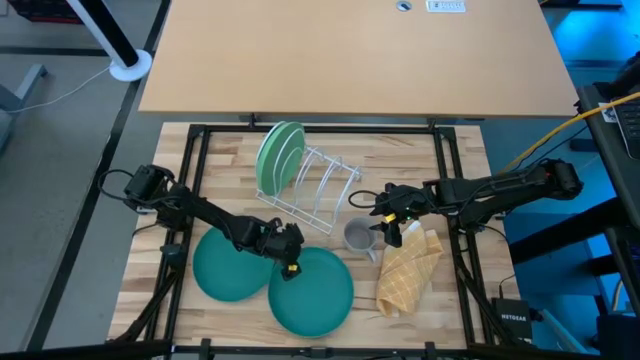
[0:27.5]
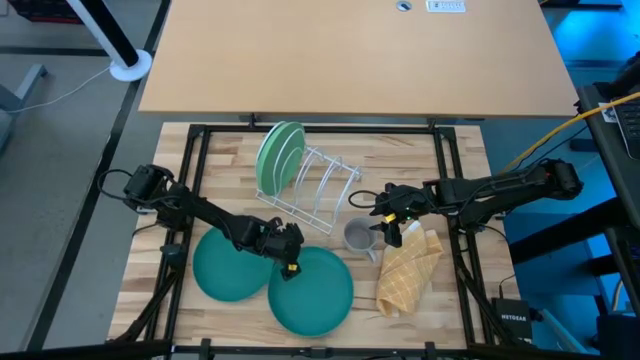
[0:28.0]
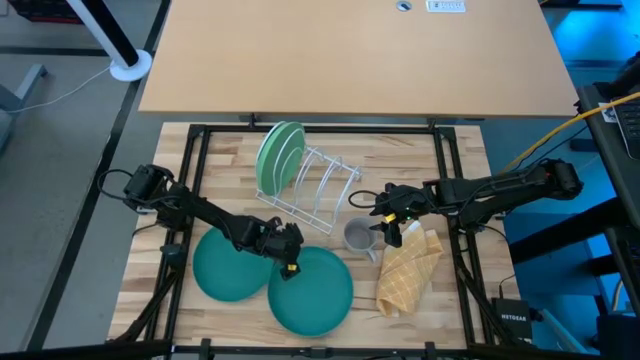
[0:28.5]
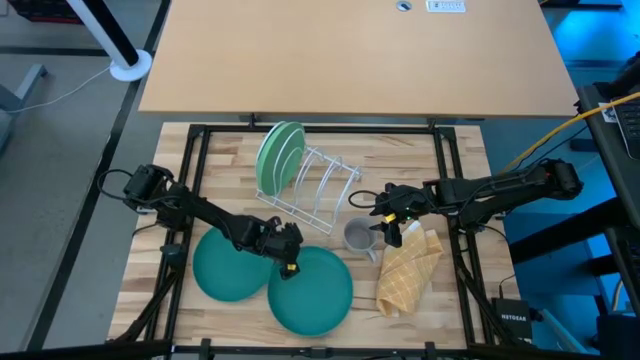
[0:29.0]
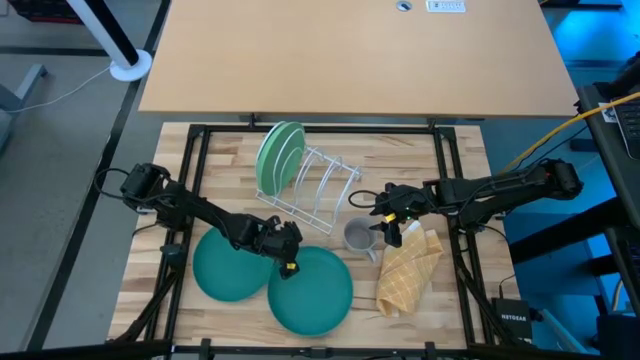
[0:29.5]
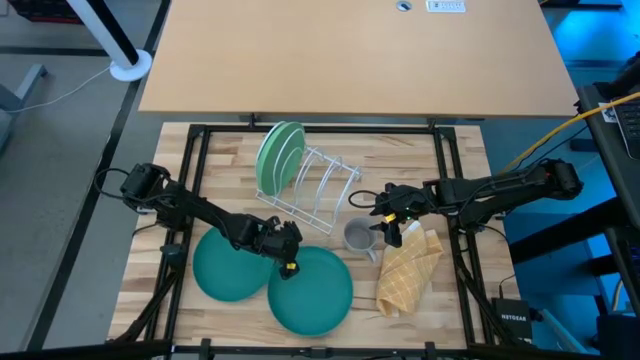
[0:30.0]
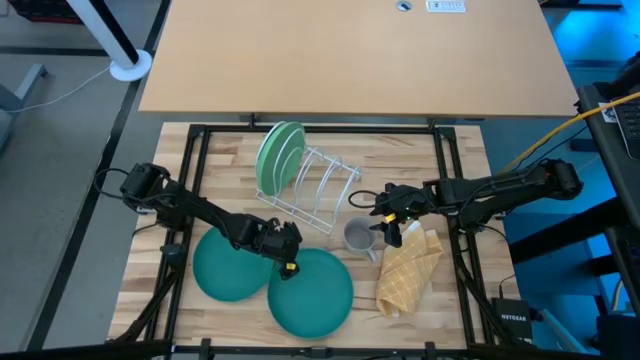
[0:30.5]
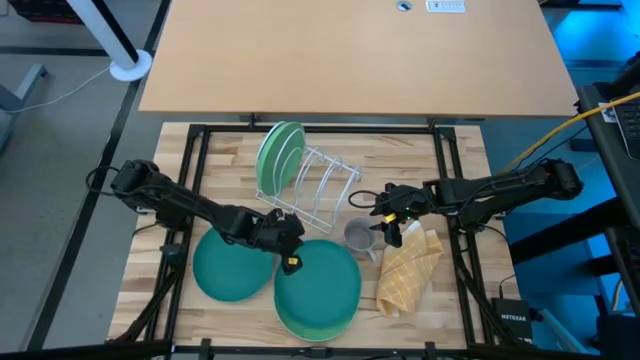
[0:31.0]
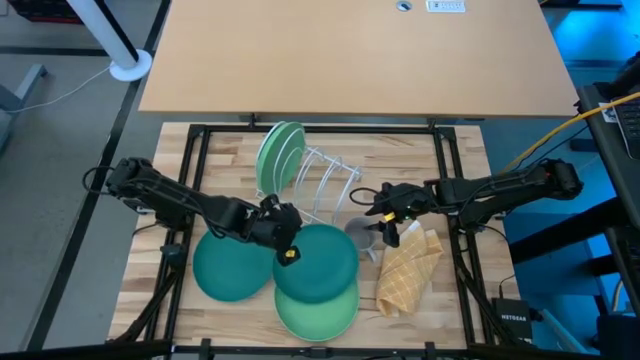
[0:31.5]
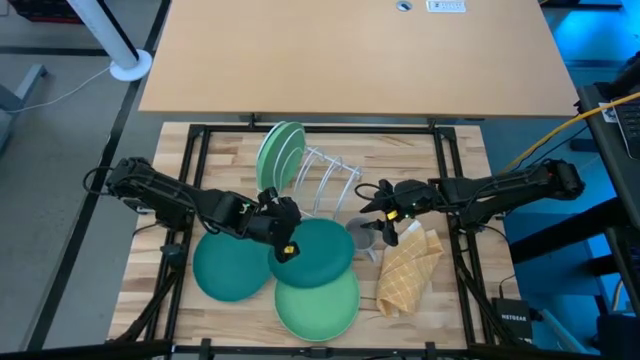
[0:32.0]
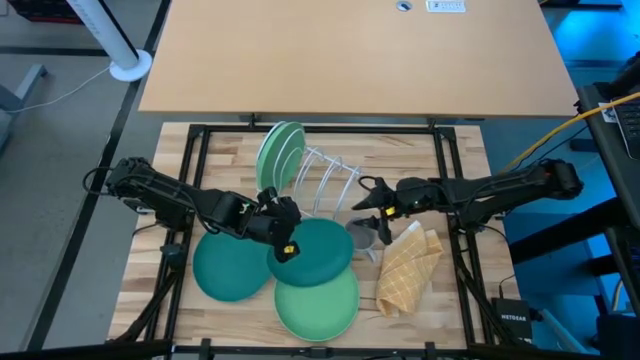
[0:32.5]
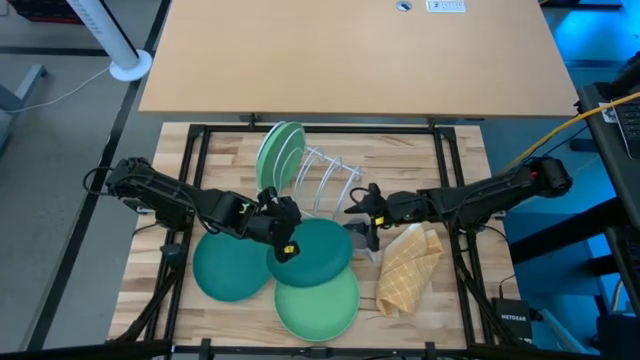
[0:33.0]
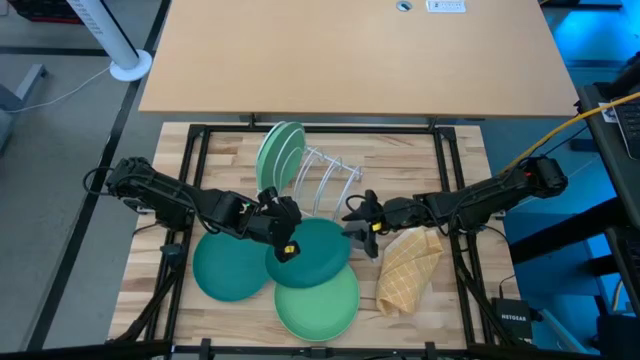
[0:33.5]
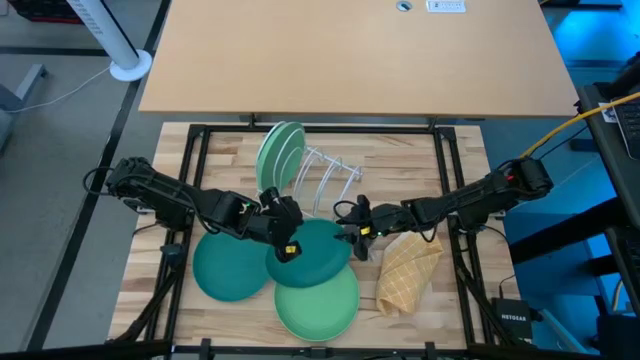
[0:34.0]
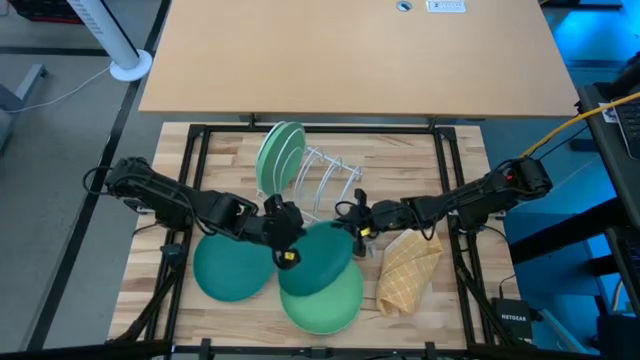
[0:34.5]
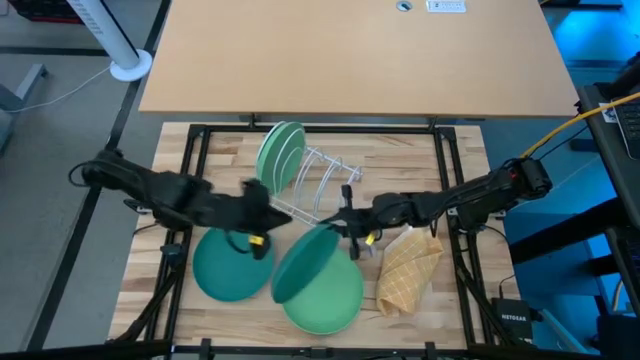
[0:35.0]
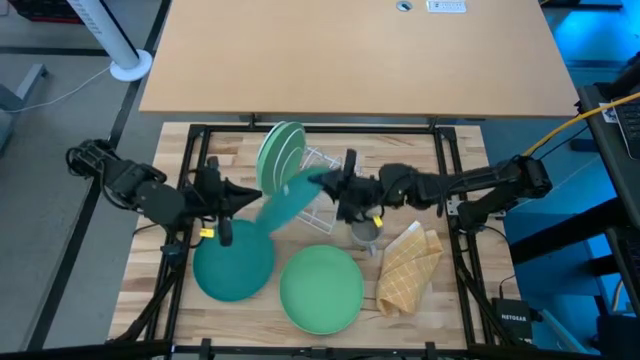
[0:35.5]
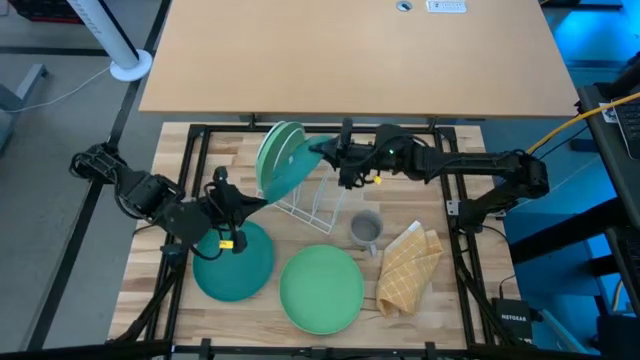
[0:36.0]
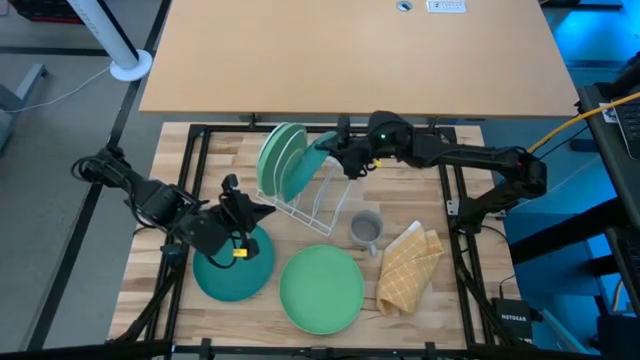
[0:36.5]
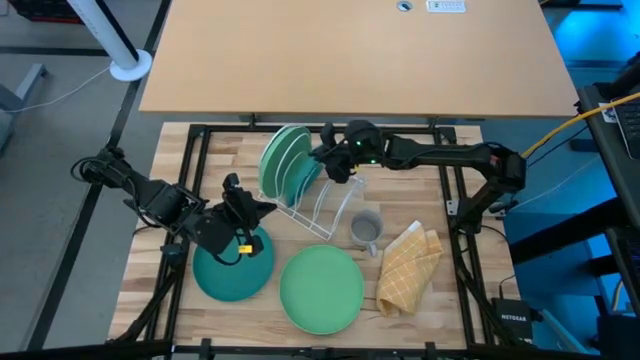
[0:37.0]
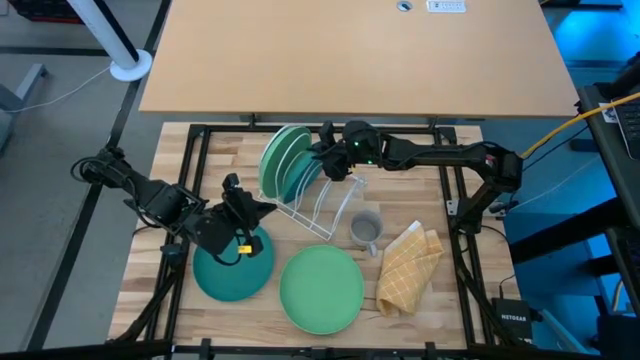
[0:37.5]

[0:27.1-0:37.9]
Task: Sort dishes
Put the right blue plate into the white dish rack

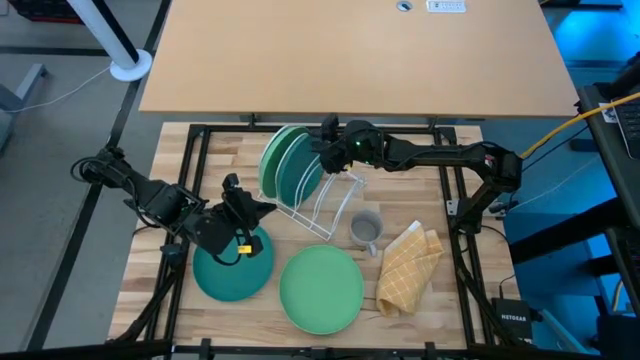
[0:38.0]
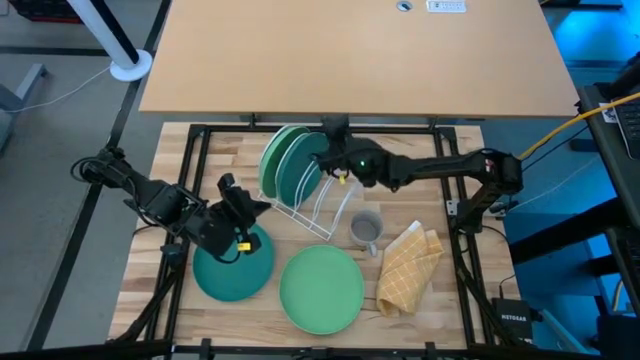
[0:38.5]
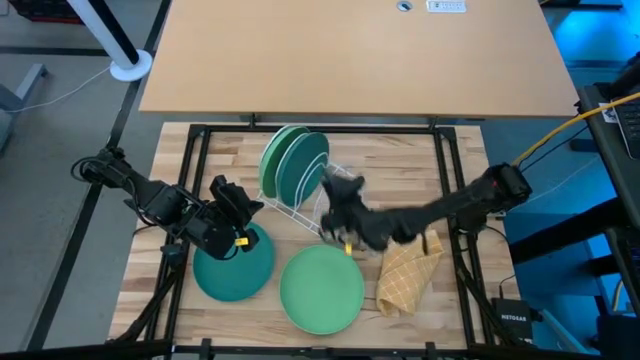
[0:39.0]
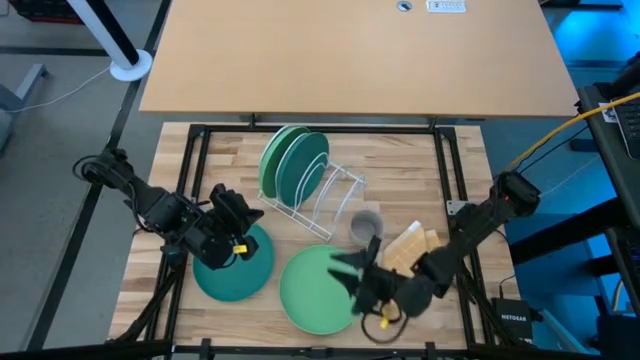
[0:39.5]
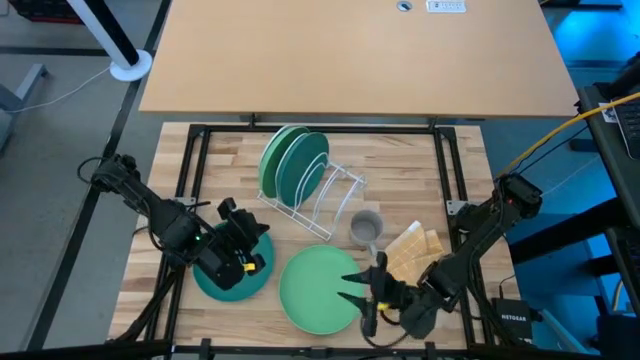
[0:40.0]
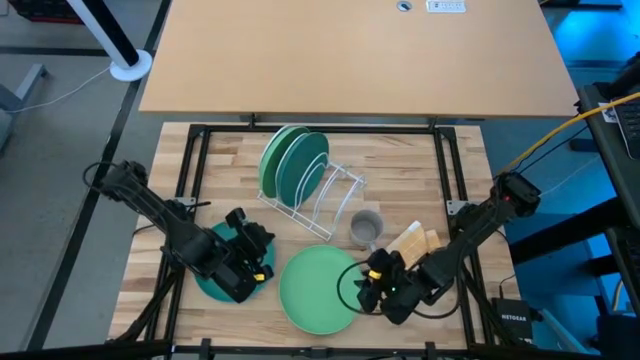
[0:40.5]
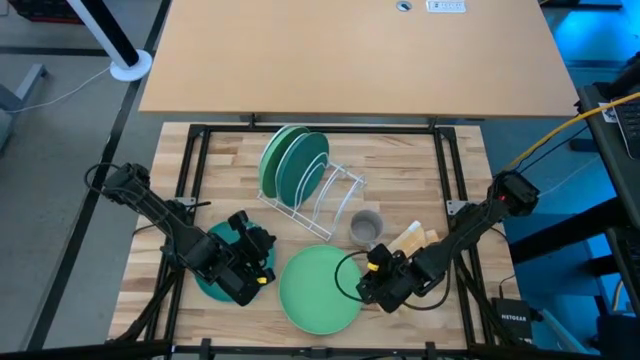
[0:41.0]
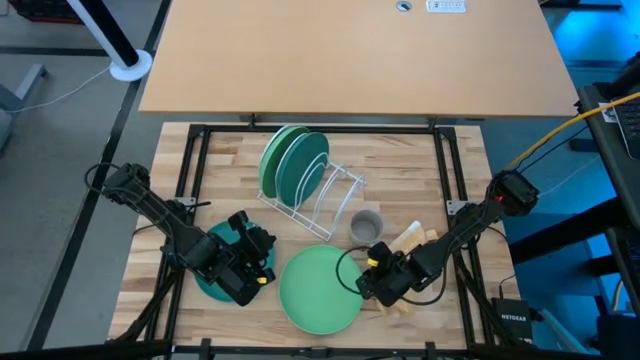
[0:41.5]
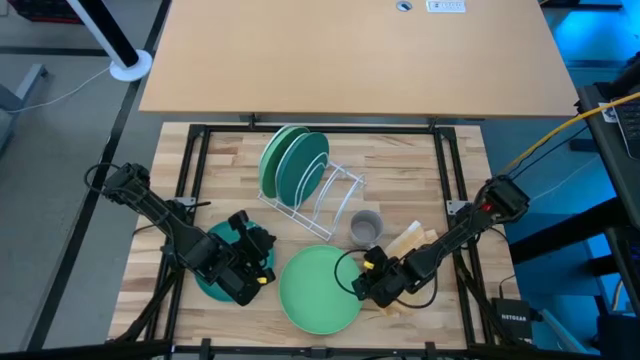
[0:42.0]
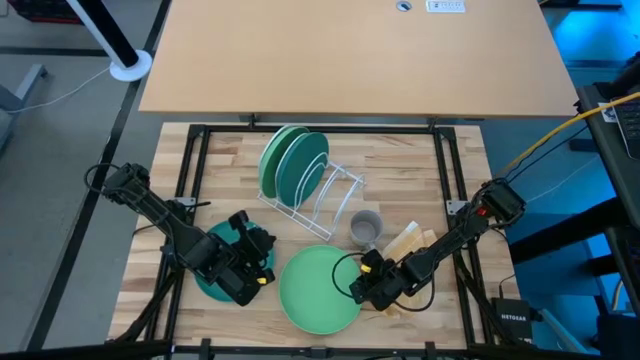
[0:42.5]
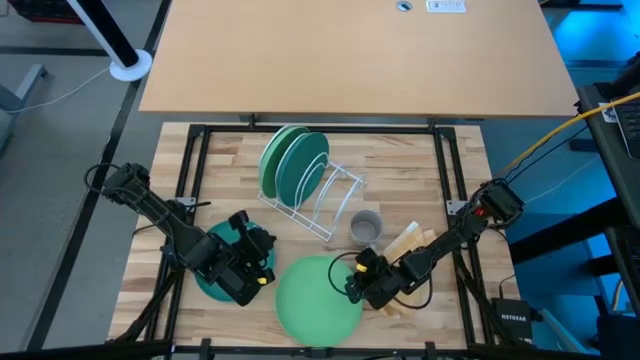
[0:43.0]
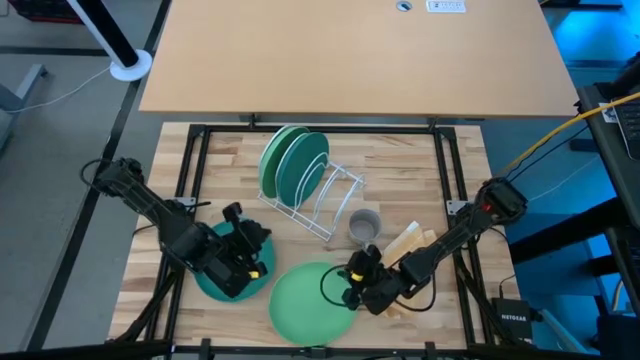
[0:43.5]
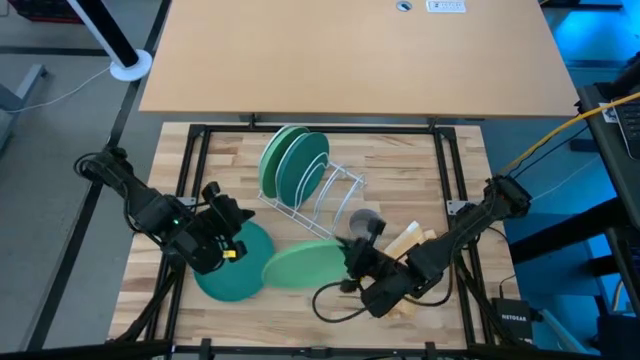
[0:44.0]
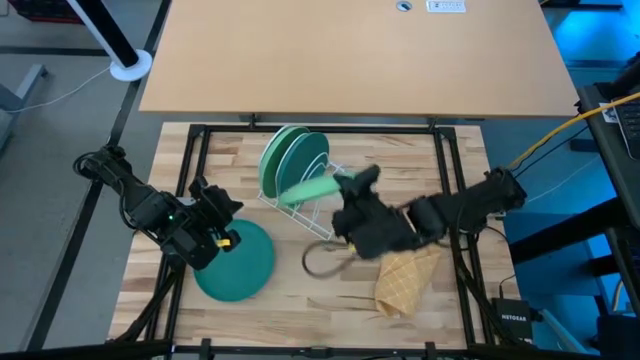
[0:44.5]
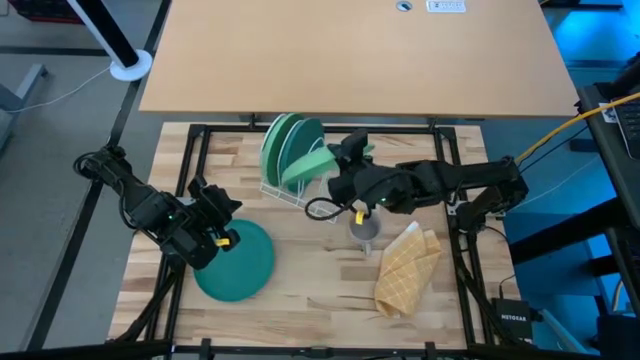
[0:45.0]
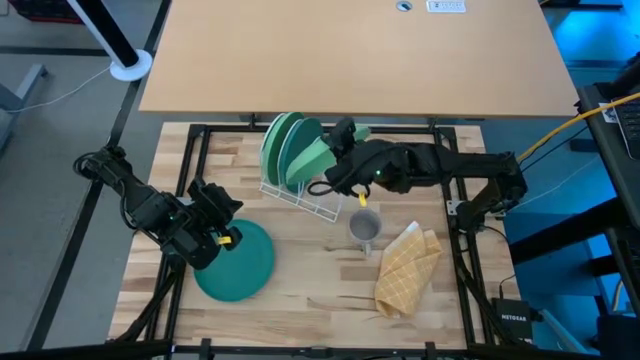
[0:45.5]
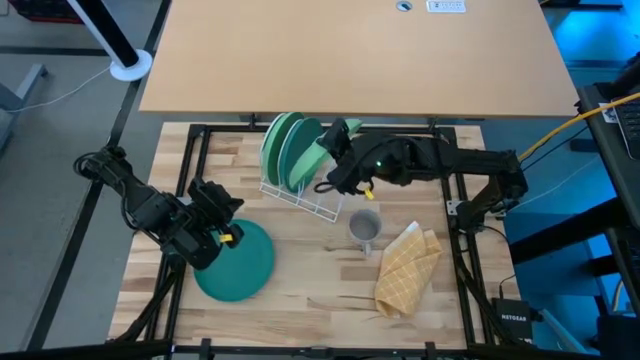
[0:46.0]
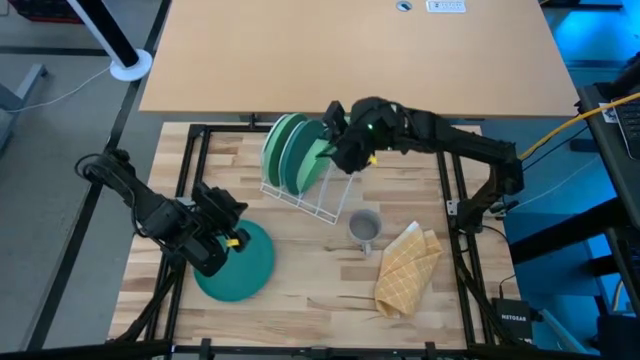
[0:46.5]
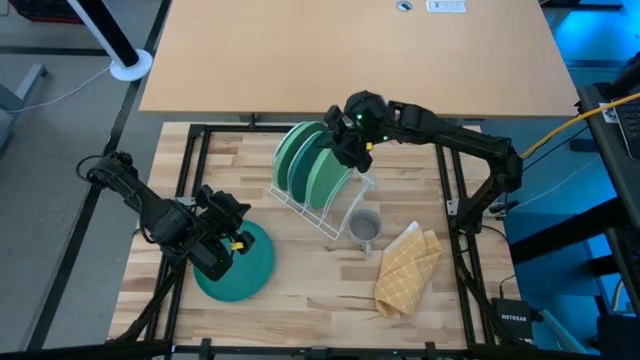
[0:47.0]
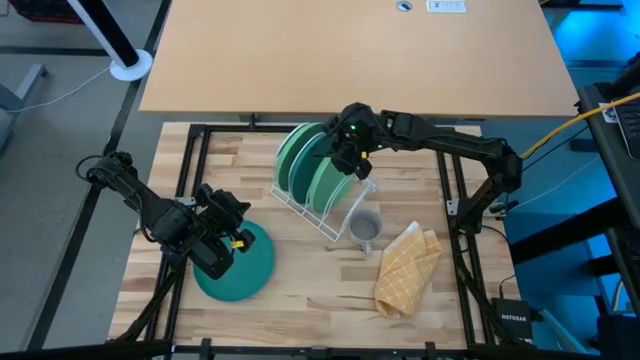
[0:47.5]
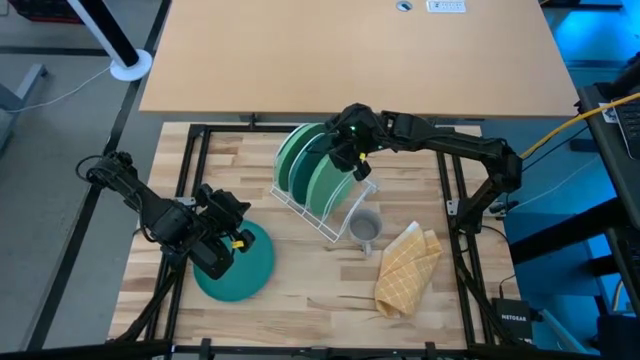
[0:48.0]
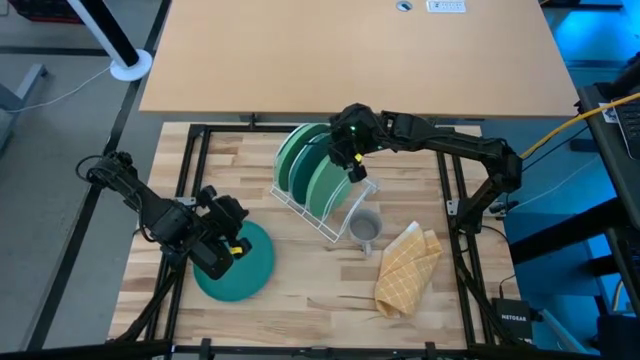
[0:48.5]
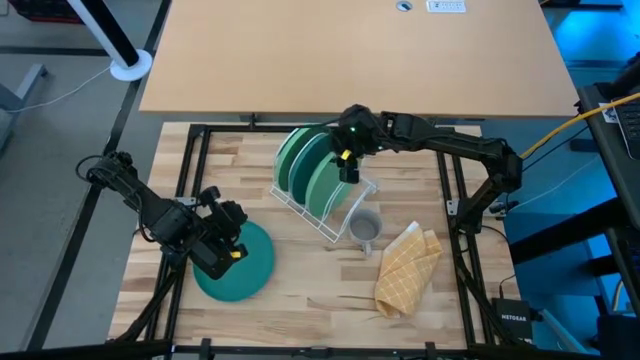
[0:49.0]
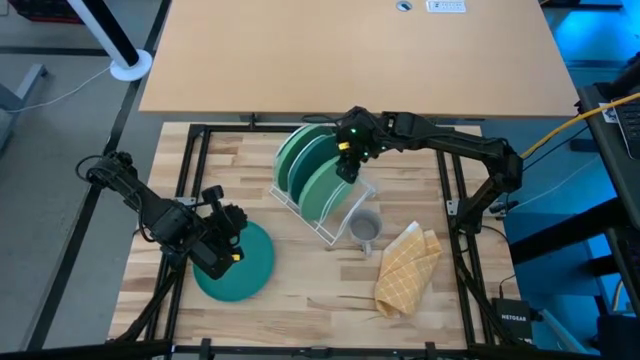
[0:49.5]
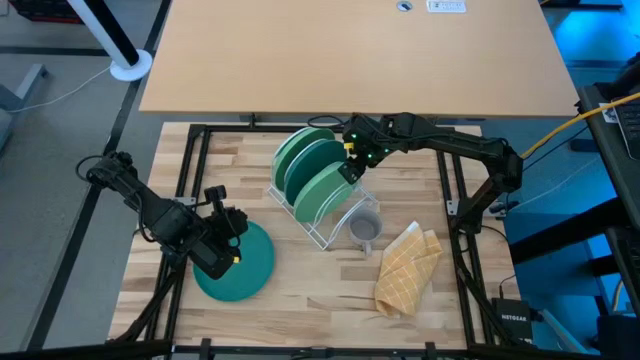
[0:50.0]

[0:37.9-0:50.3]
Put the green plate into the white dish rack
